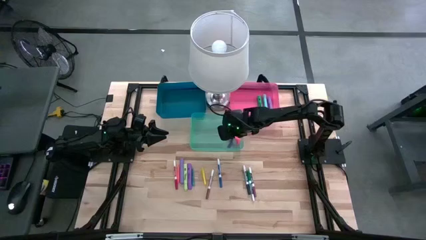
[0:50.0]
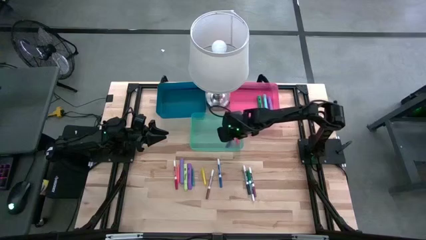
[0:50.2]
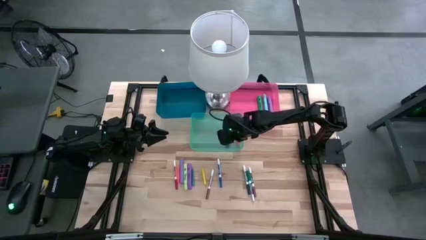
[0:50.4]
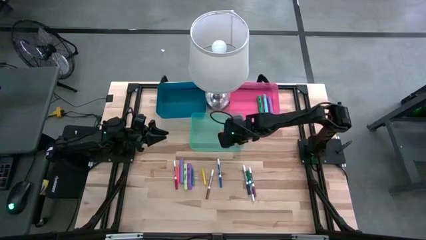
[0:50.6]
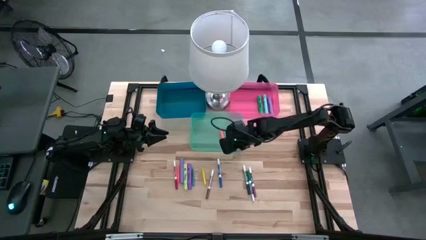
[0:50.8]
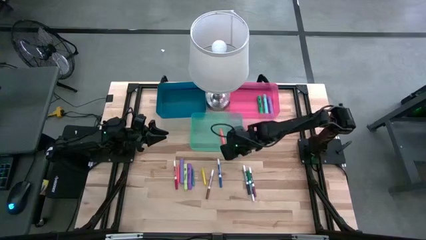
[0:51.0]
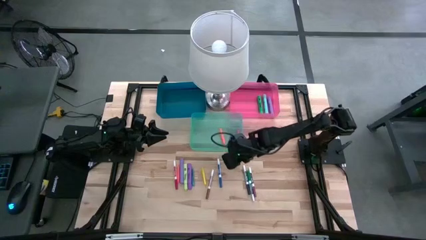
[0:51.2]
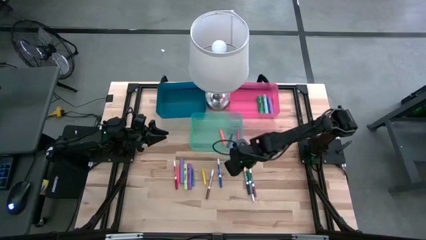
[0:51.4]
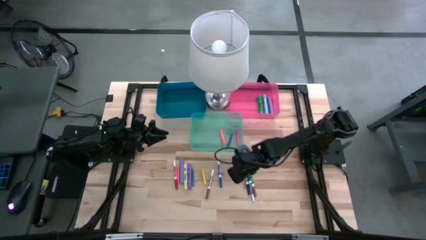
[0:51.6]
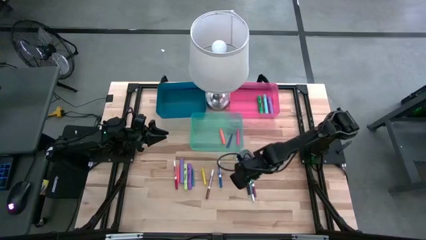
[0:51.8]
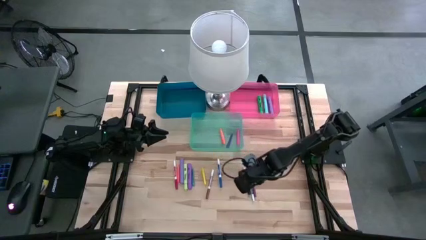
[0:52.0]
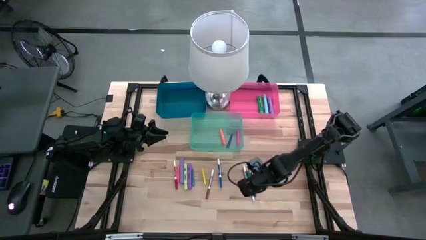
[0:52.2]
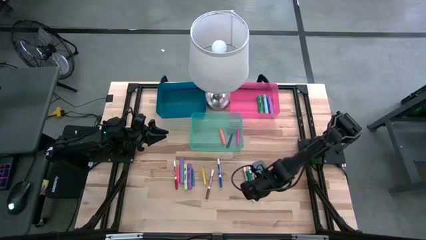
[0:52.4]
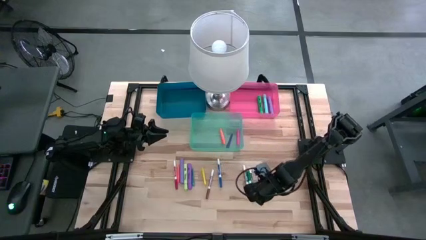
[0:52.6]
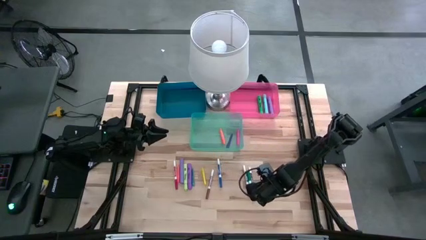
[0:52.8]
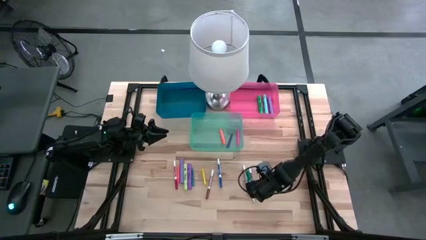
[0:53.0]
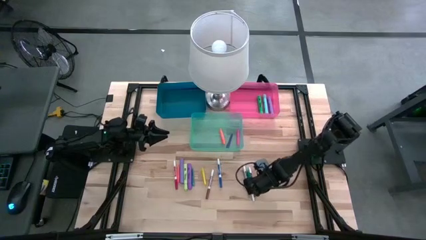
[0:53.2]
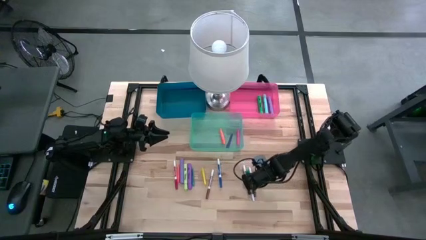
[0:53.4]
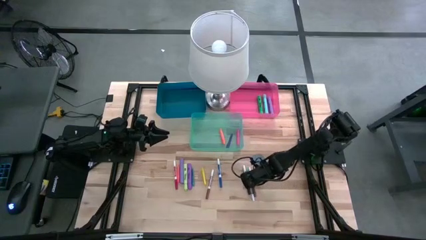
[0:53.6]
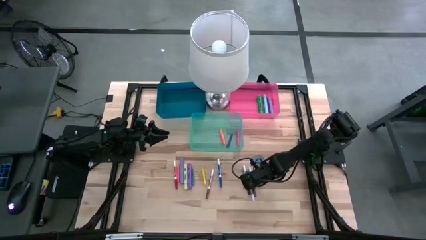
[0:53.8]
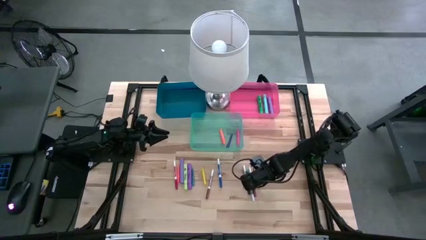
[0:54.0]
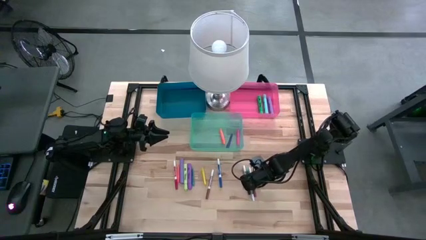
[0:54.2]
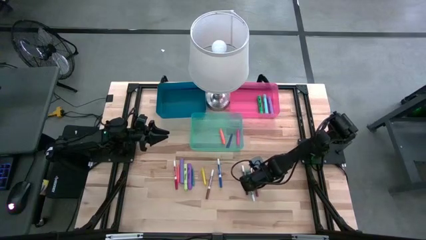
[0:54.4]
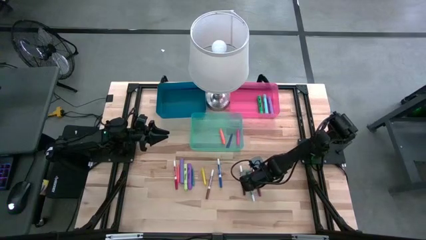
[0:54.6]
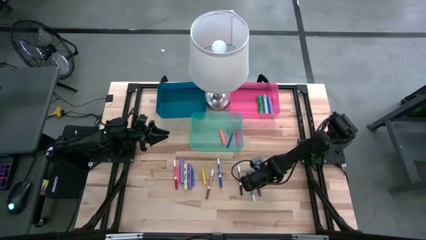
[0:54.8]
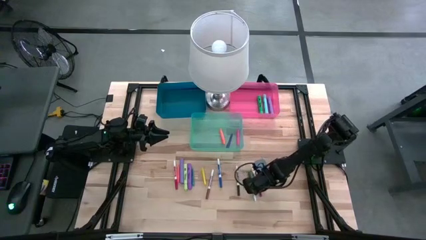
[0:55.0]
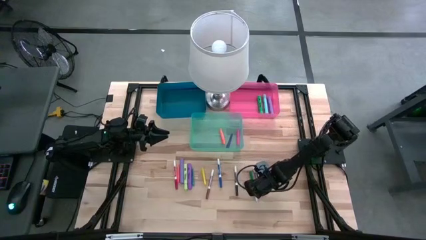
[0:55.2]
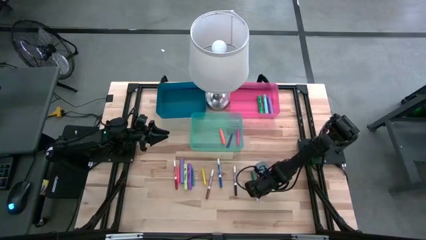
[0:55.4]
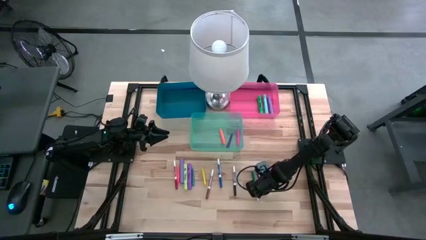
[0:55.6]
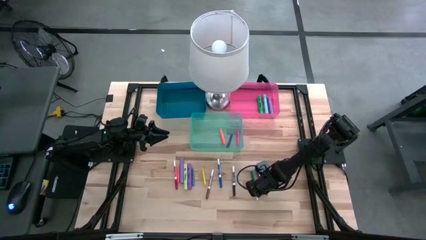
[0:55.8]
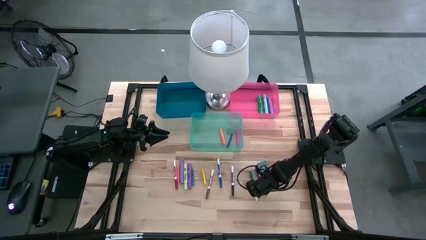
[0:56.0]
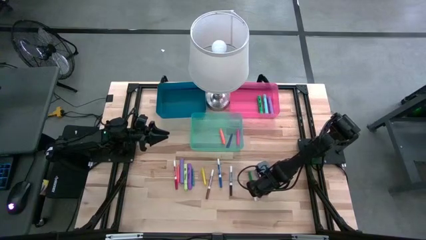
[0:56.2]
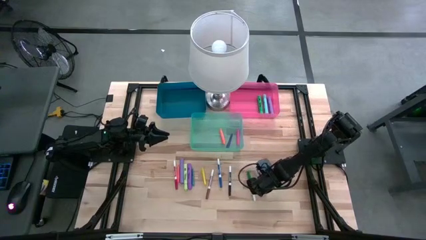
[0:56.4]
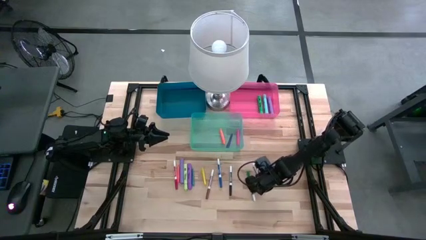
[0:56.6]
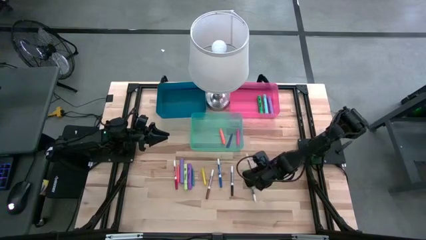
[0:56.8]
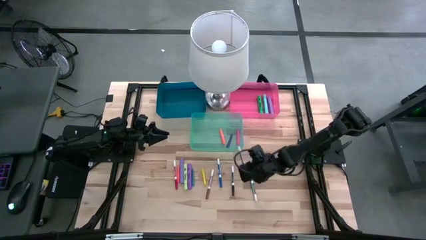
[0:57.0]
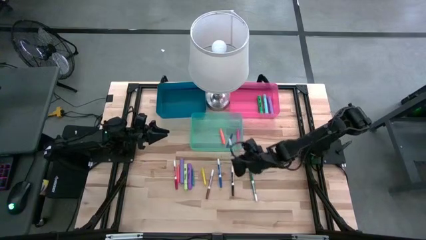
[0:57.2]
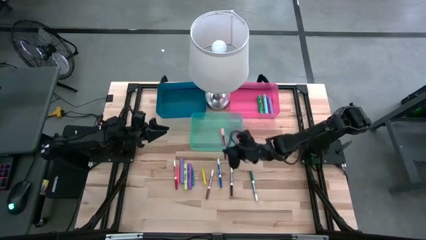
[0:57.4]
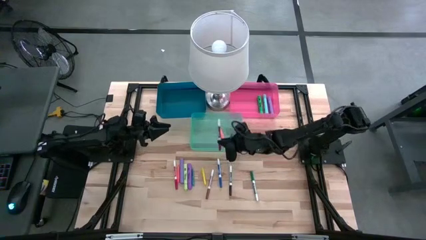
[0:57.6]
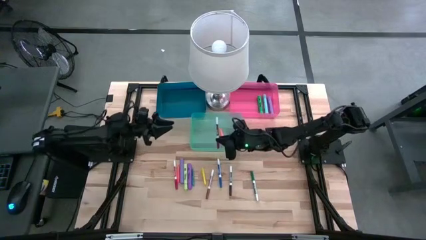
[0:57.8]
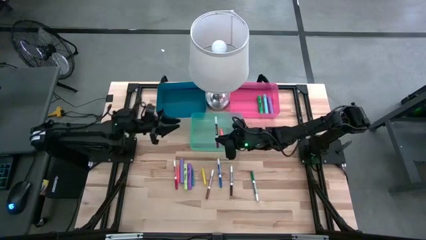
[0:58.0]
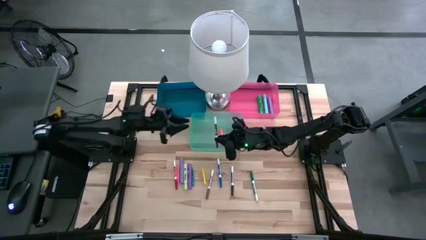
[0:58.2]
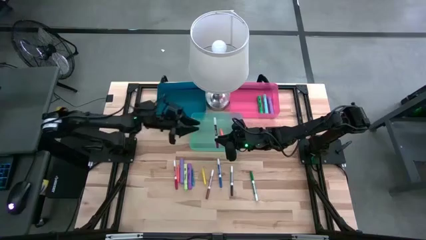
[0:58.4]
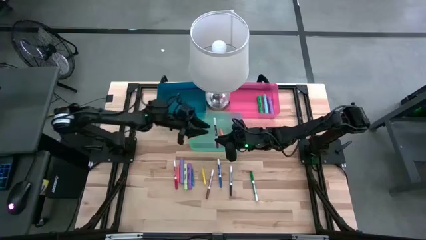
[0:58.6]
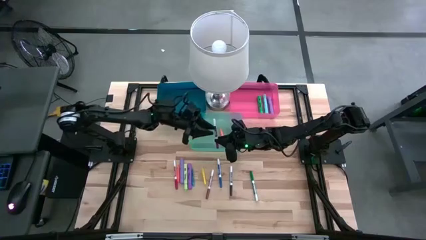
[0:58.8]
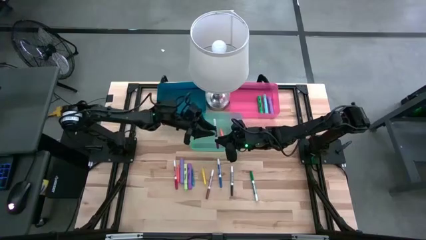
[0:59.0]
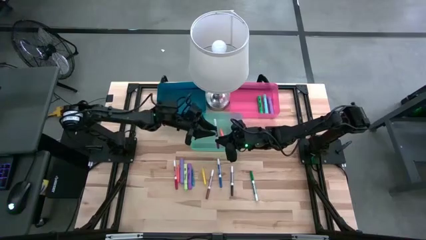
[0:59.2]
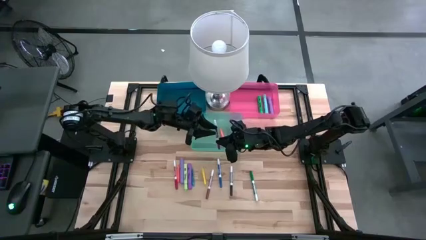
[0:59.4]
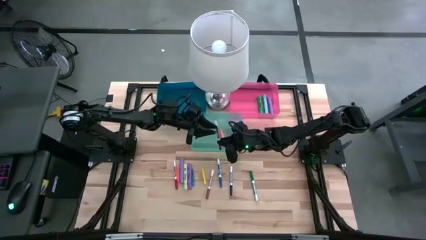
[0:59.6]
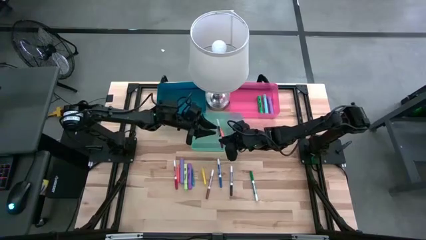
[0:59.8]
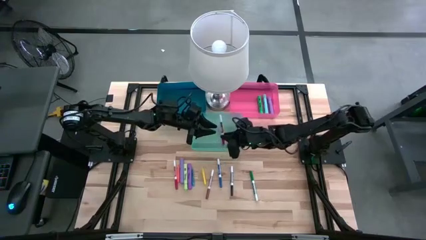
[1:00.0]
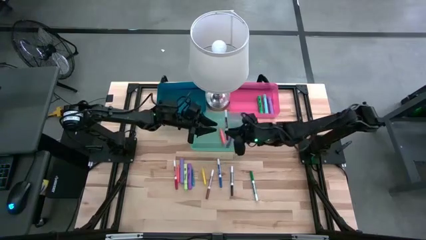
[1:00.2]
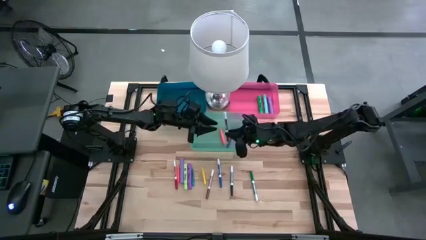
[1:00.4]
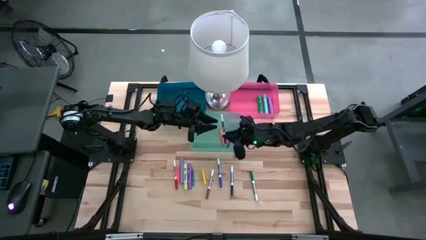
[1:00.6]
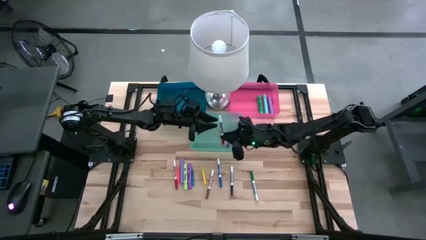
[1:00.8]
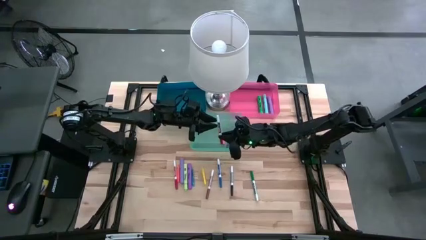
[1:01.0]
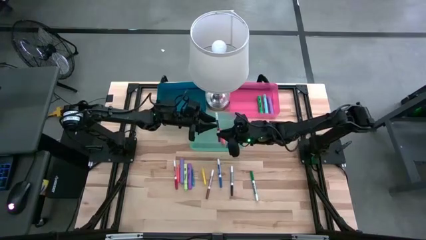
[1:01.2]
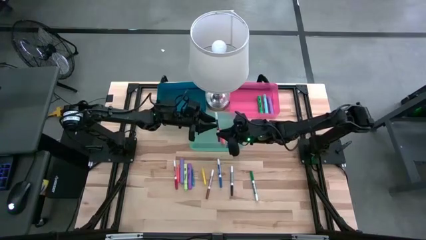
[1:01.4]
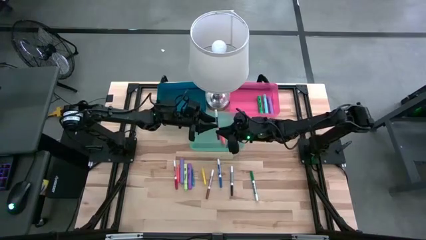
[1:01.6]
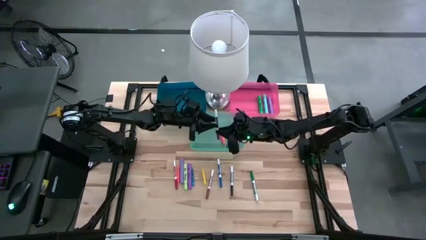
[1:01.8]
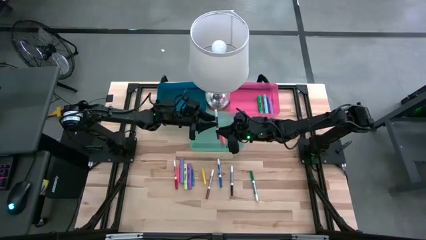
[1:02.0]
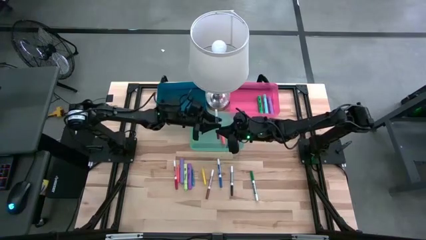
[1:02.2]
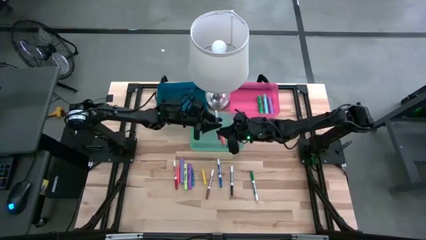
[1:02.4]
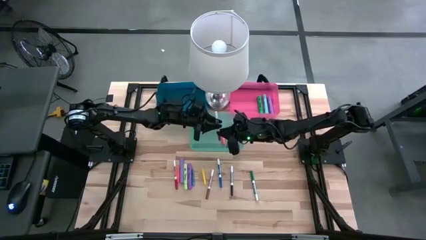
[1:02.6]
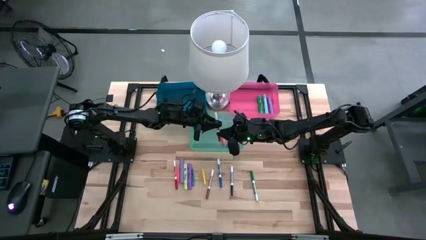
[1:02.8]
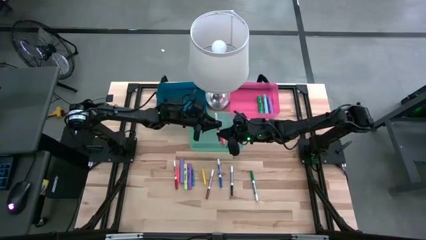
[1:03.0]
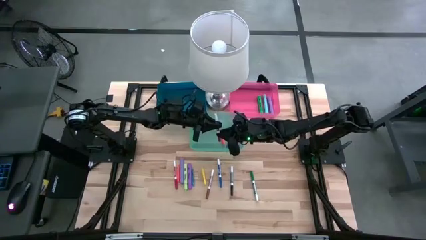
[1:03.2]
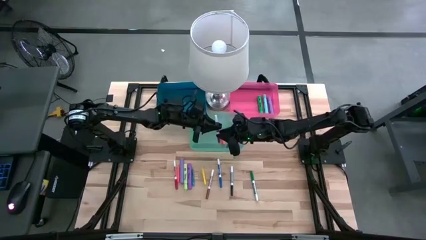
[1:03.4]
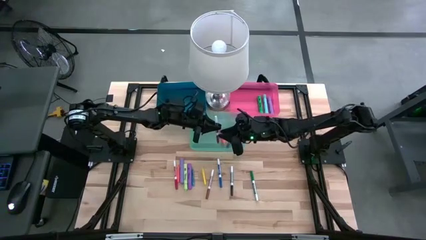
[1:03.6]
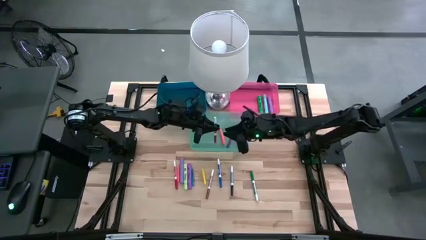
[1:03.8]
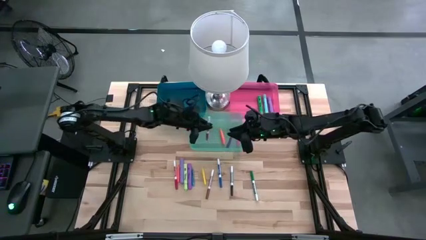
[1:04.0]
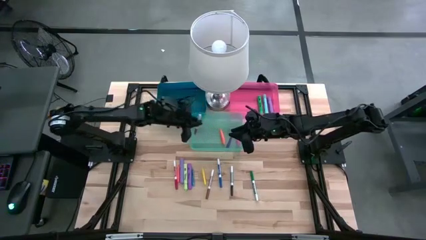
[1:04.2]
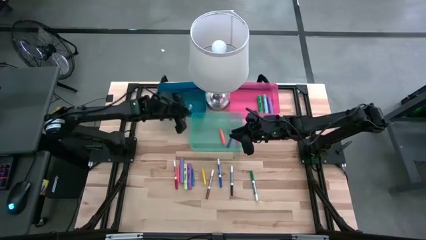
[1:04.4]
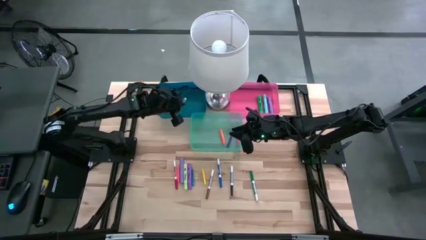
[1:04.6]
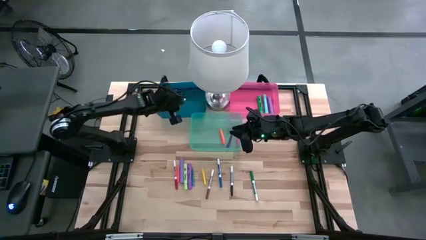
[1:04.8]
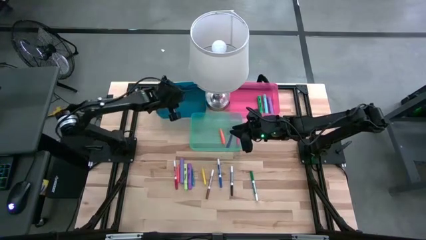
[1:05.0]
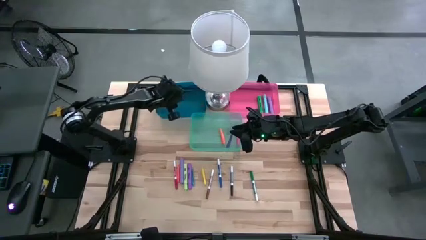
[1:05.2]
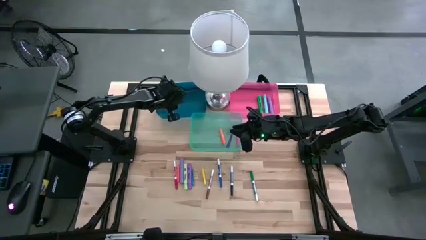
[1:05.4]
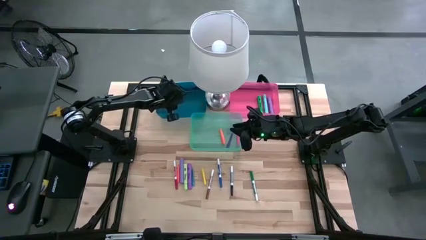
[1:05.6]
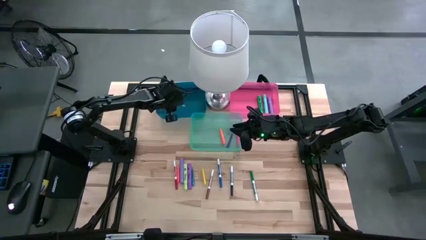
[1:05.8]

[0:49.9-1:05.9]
Task: Pick & Place Markers
Put the dark red marker pen into the blue bin
